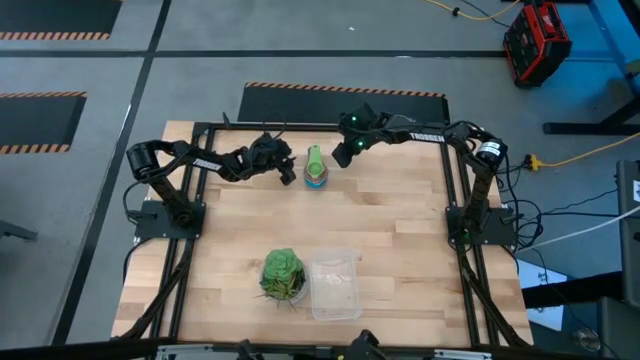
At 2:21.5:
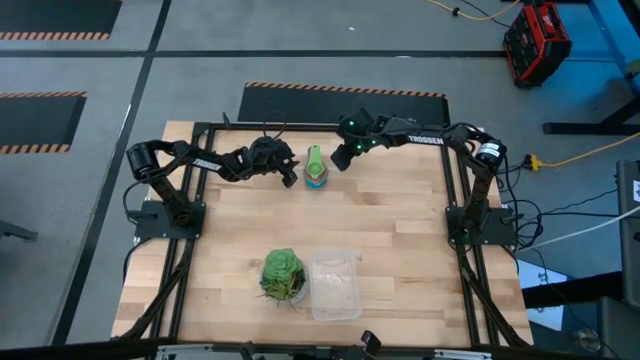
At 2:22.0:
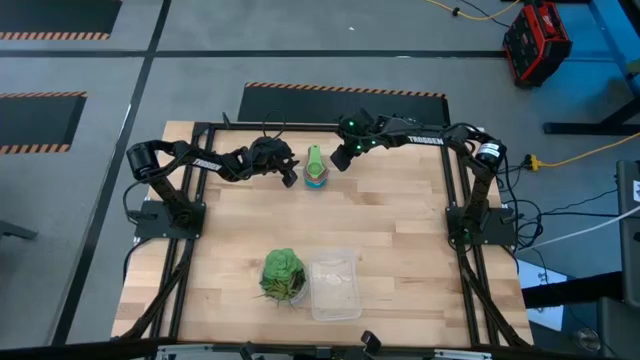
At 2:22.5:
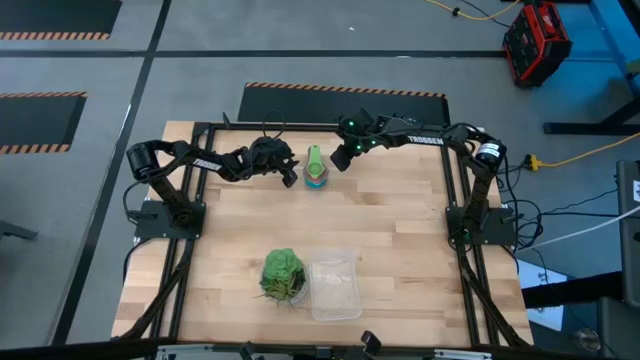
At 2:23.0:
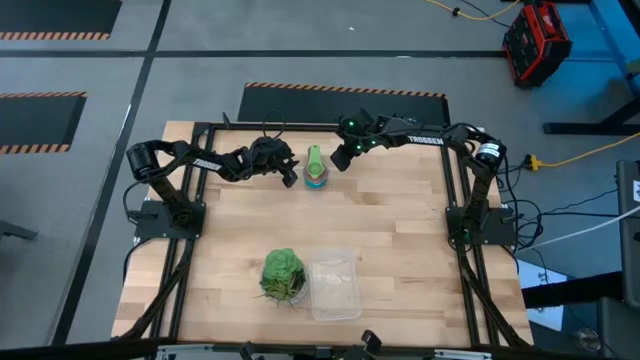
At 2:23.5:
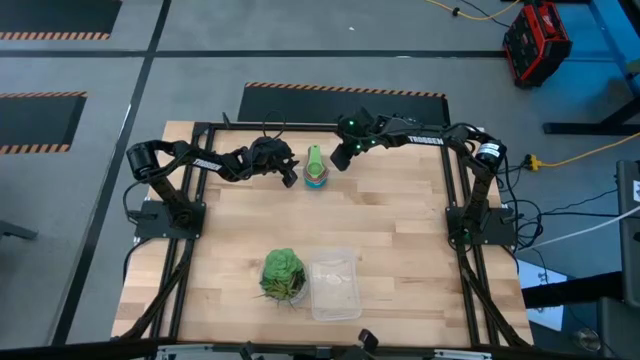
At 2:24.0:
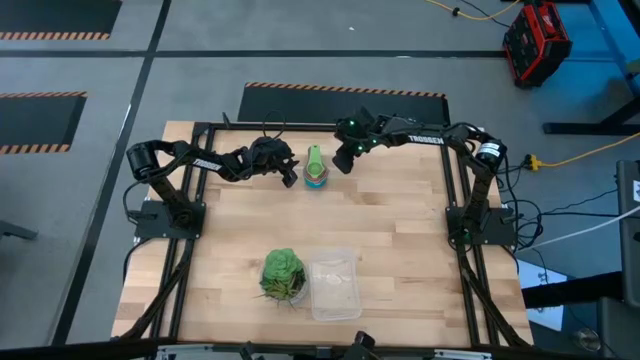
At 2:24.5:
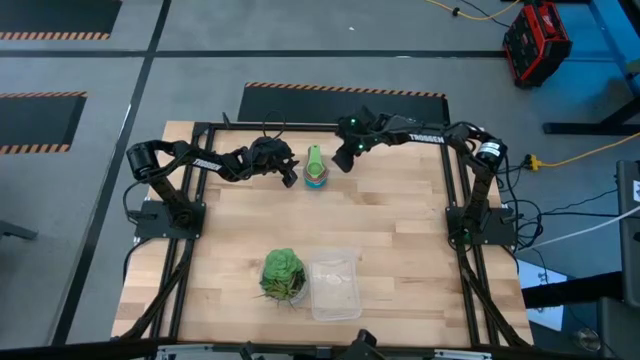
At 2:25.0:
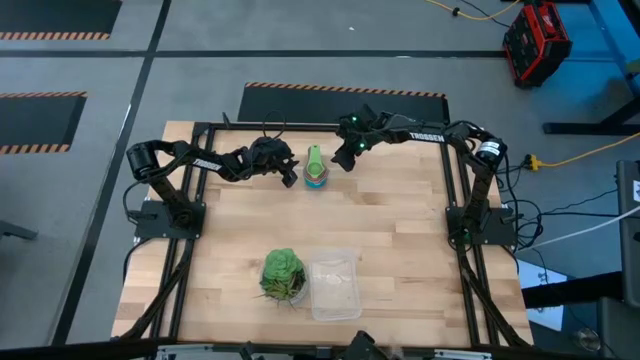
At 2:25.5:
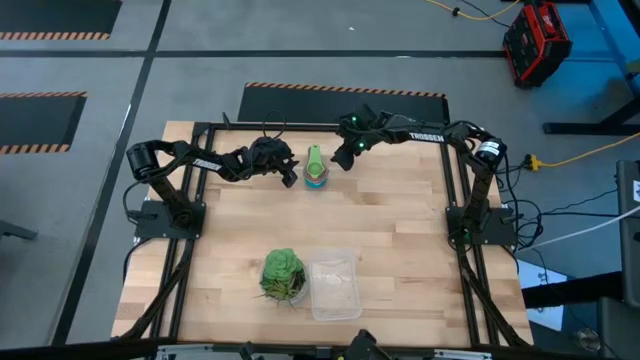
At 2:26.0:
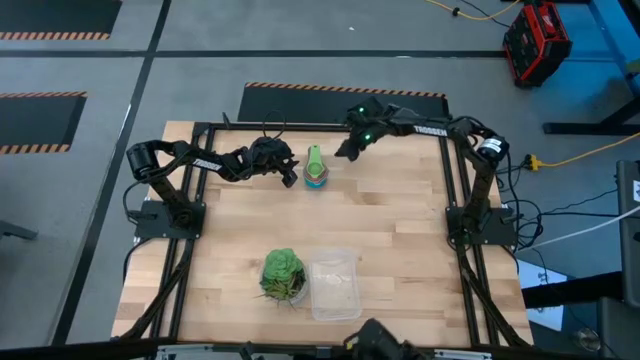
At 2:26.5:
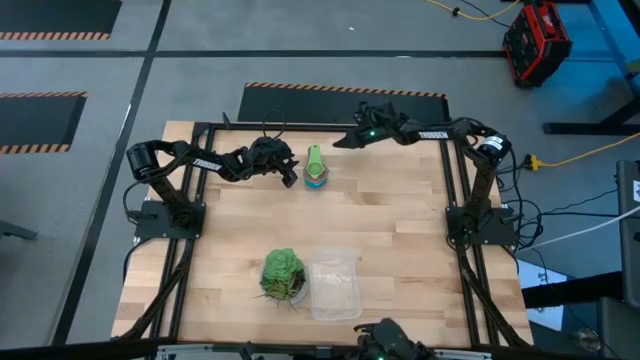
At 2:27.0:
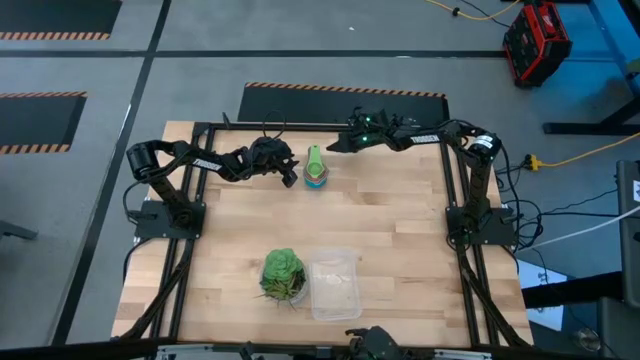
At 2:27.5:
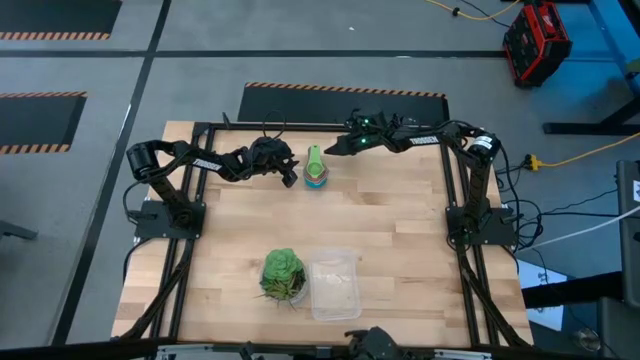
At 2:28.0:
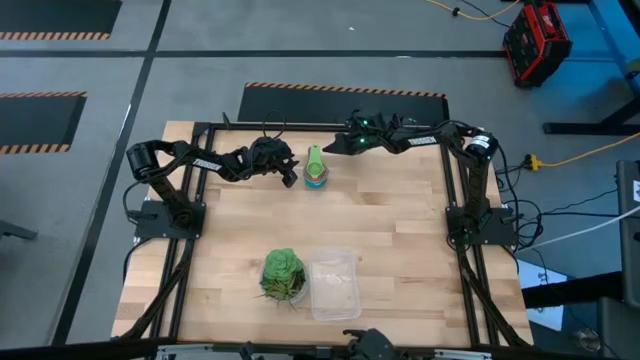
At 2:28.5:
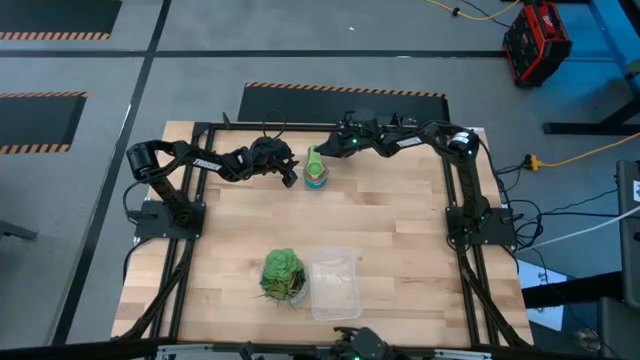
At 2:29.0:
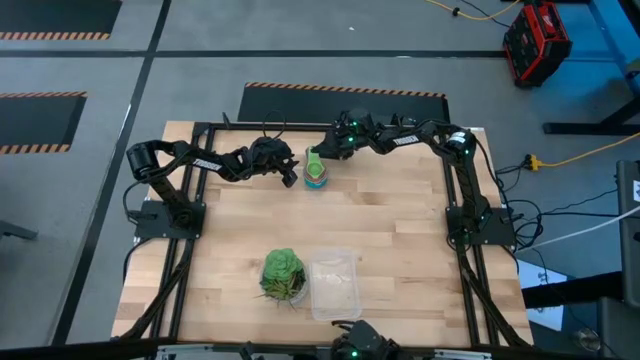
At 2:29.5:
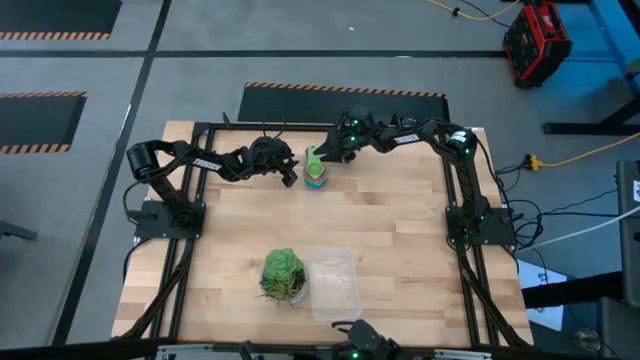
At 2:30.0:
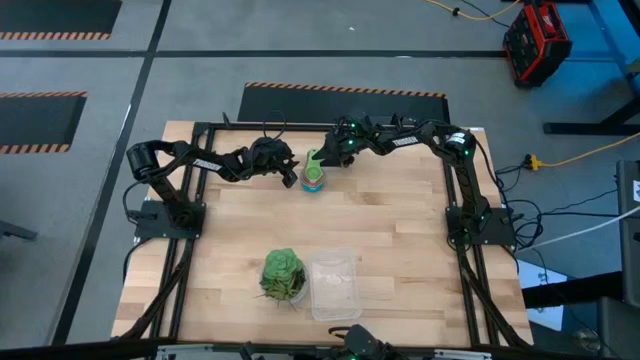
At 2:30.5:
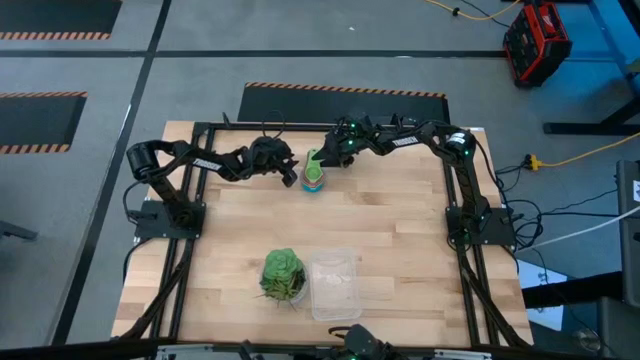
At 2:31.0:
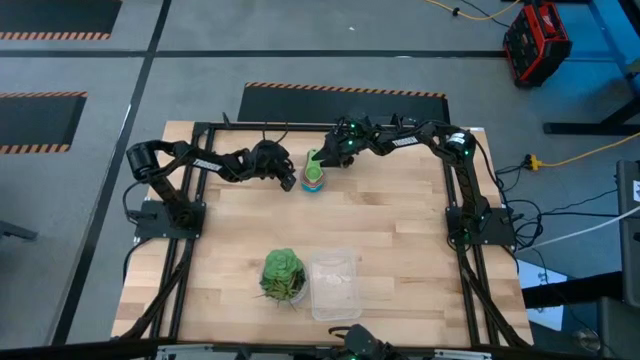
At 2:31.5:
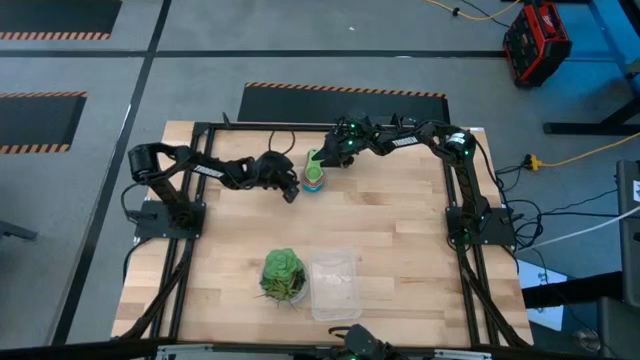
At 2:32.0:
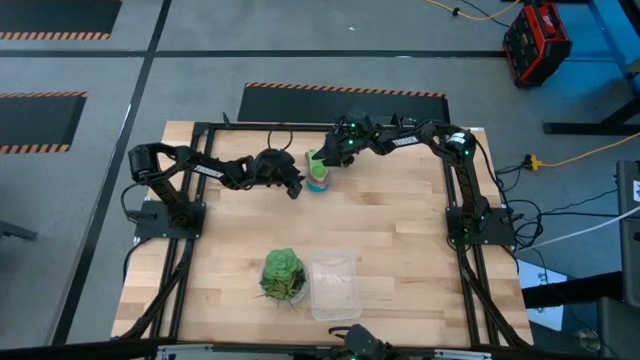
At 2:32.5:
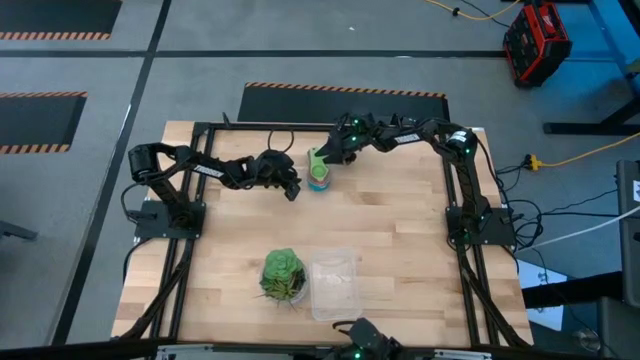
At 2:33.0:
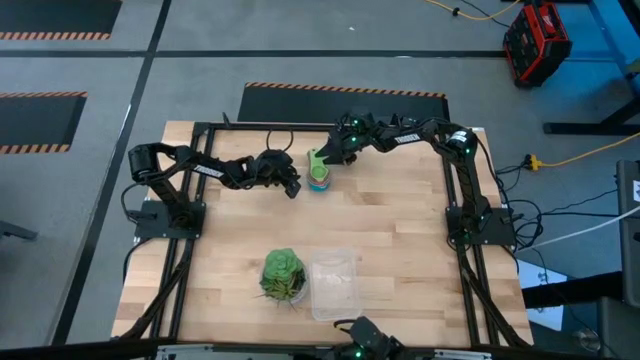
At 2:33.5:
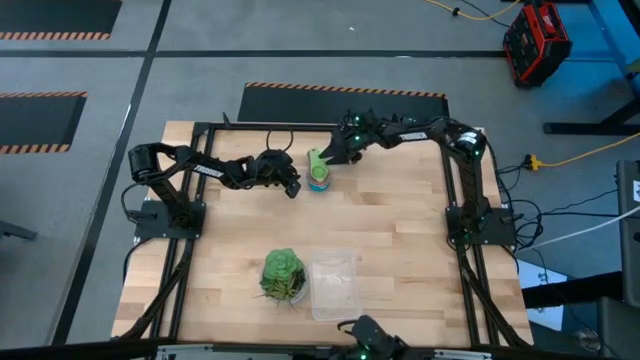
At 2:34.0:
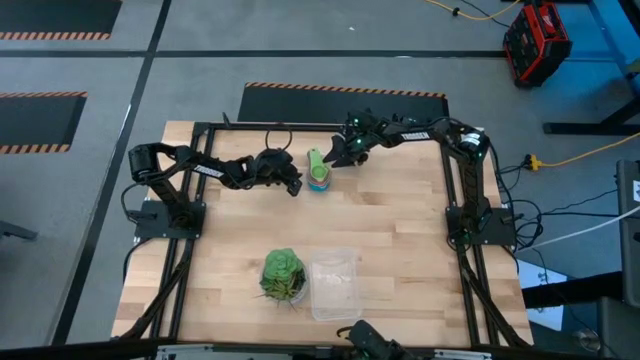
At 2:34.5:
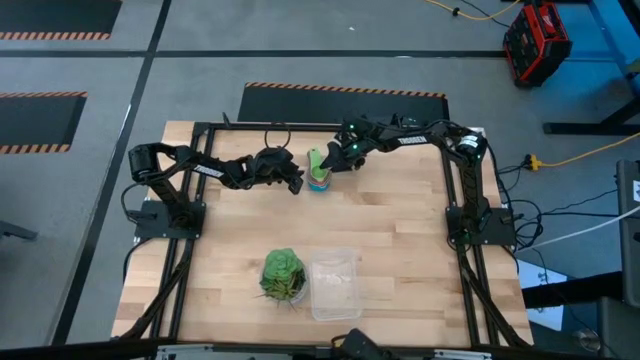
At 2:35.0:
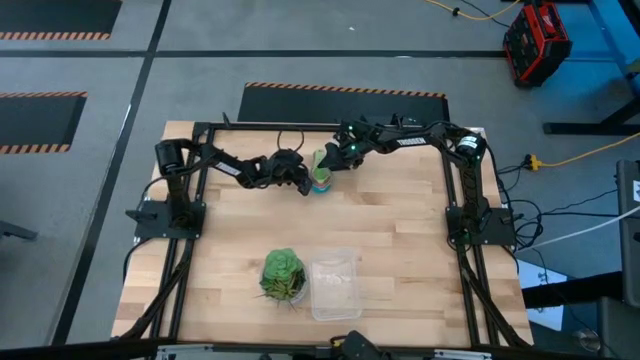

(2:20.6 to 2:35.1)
Task: Nest measuring cups in basket
Put the nested measuring cups into the transparent bin
